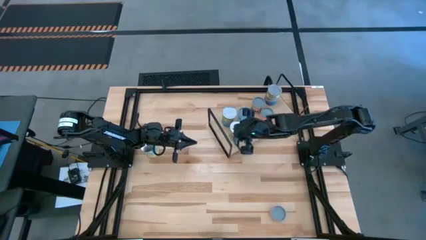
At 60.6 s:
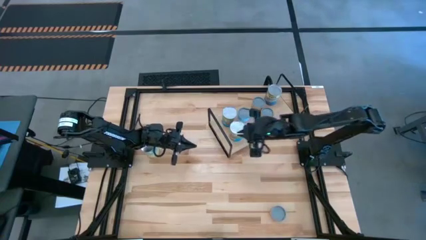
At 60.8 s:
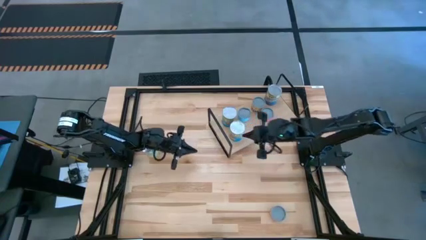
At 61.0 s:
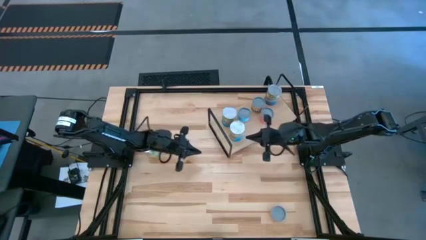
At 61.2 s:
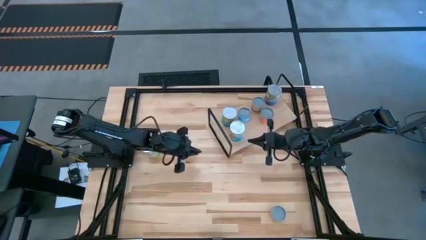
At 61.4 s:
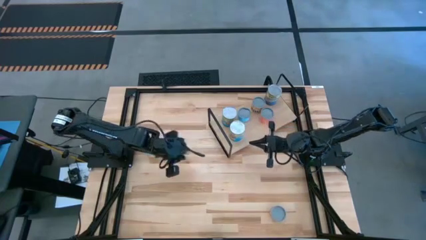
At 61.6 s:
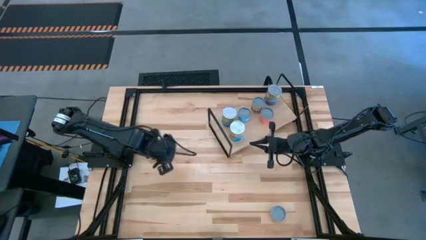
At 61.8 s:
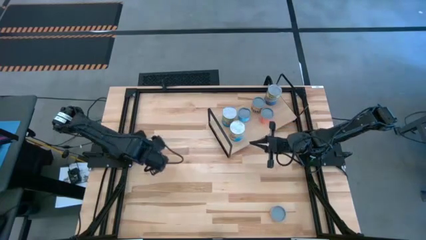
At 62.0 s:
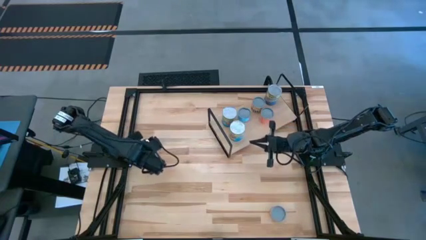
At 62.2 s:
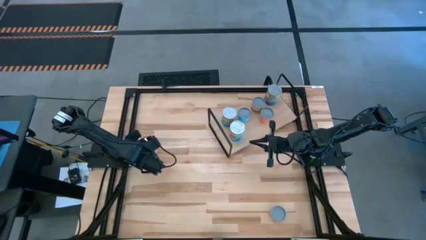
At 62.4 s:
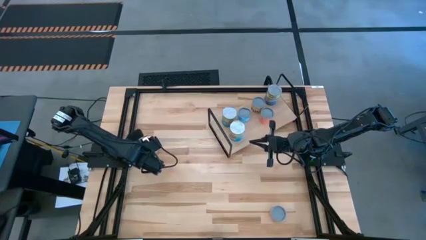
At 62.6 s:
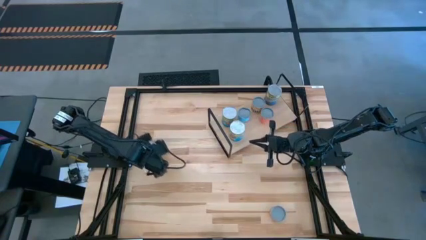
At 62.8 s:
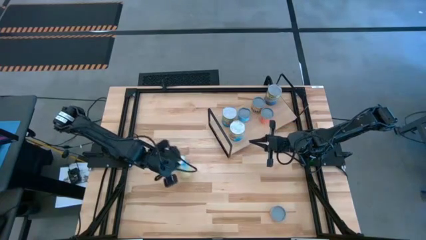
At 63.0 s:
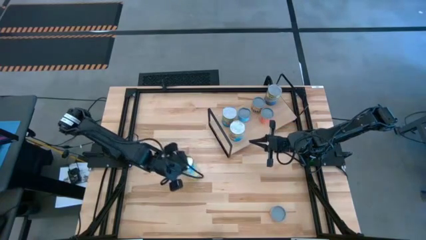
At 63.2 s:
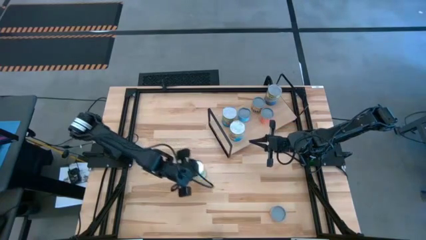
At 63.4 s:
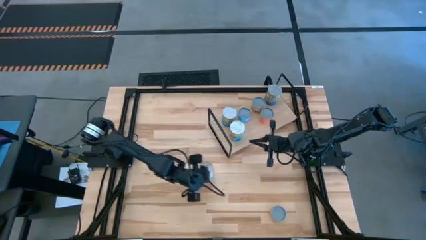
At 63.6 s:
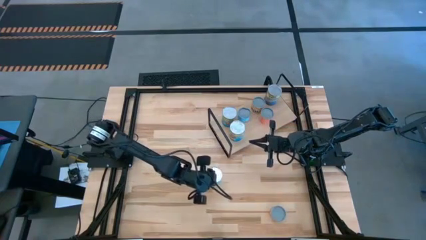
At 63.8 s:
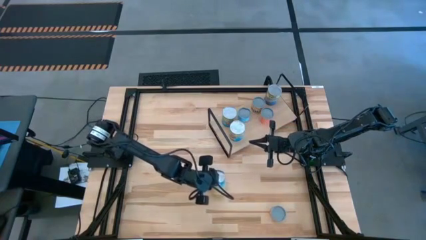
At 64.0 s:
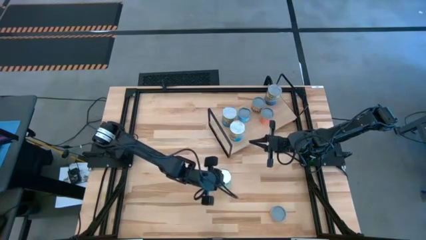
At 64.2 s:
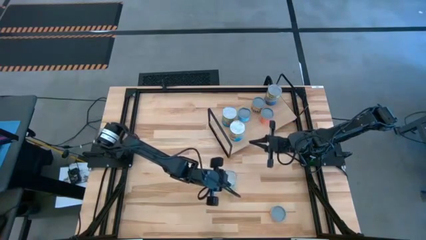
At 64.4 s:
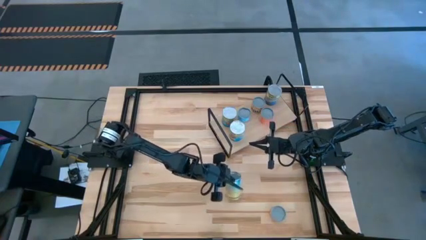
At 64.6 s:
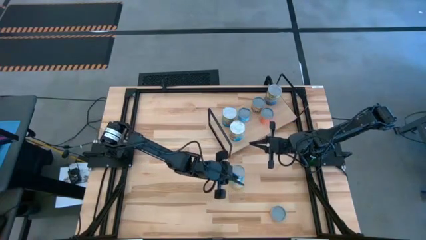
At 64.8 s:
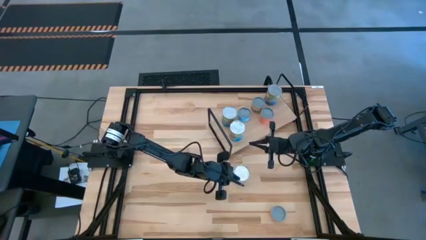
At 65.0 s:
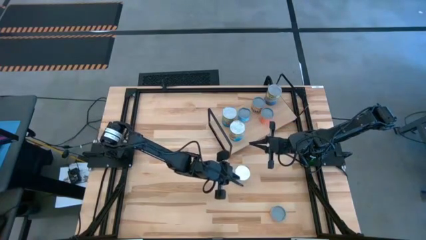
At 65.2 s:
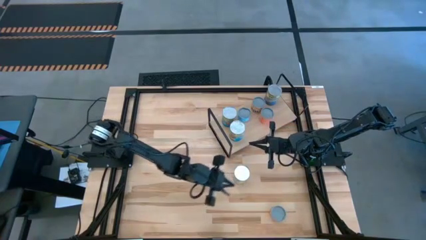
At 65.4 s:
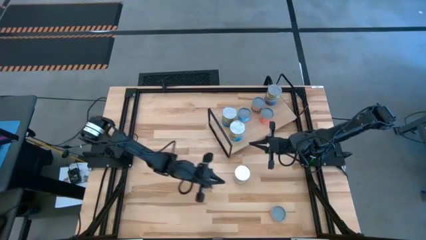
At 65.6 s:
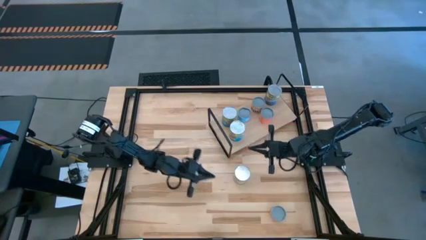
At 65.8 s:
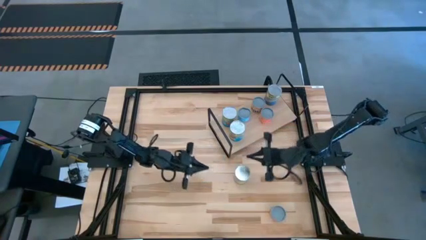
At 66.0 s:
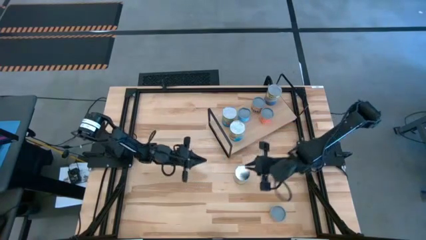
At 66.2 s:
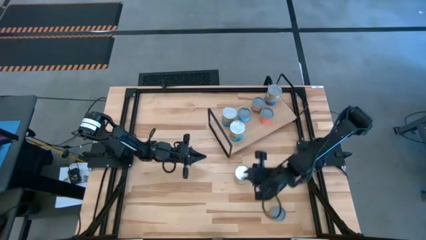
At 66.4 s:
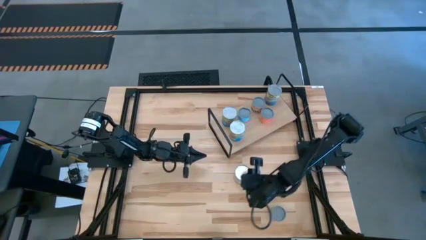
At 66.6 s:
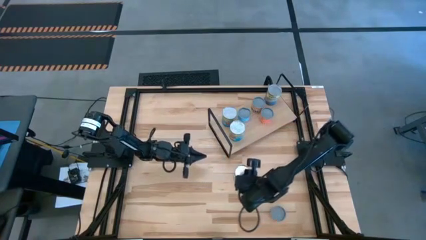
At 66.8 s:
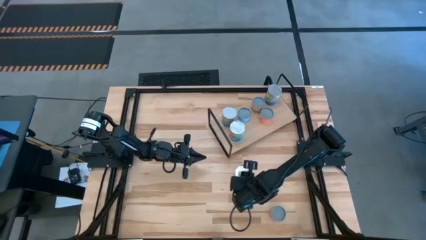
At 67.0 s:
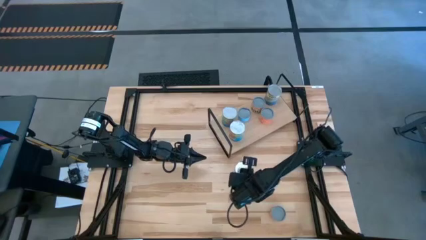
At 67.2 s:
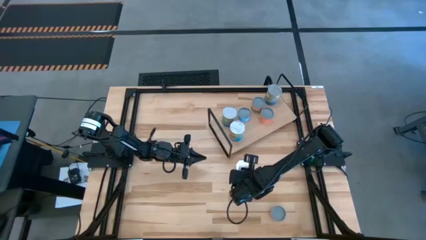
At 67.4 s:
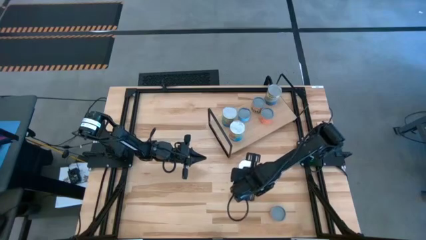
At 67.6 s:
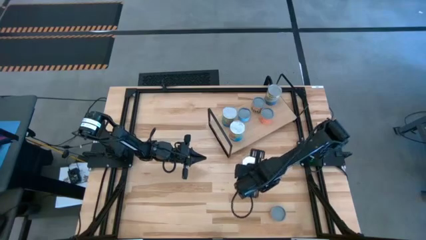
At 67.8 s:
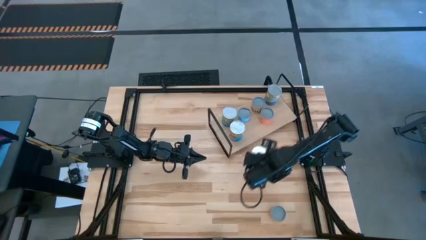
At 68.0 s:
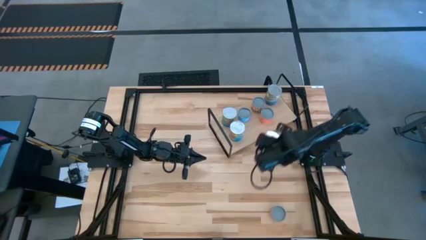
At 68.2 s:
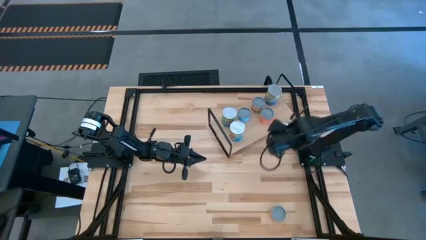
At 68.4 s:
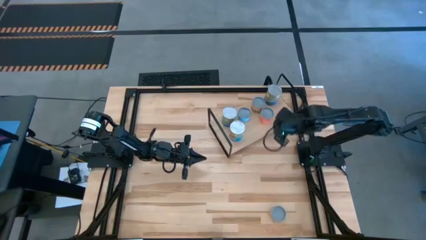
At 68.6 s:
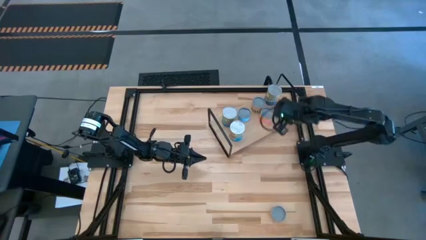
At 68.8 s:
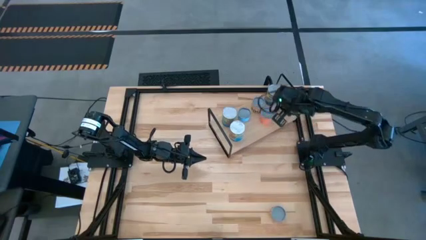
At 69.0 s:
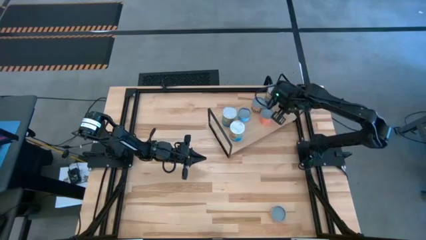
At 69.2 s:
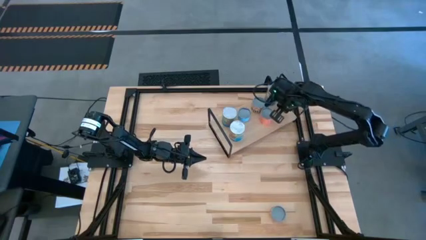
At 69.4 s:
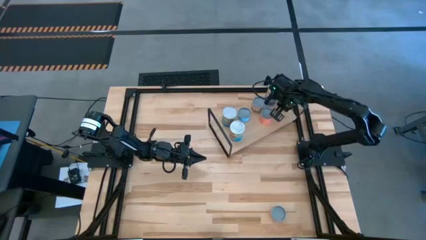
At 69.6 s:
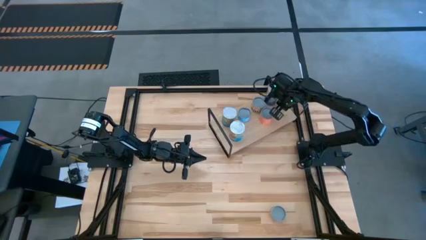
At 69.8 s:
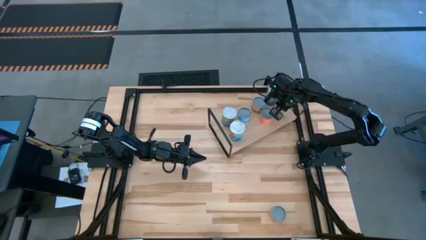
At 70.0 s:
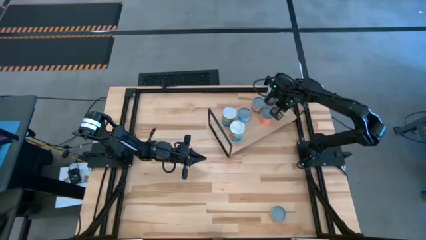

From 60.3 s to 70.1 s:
Task: Pick and place cans onto a shelf
Put the canned carrots onto the shelf aligned with other cans

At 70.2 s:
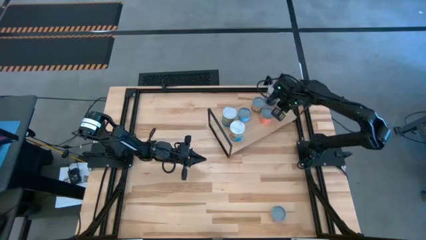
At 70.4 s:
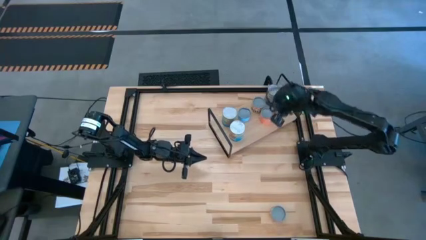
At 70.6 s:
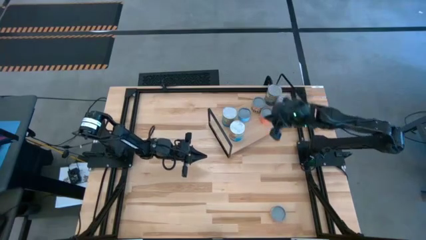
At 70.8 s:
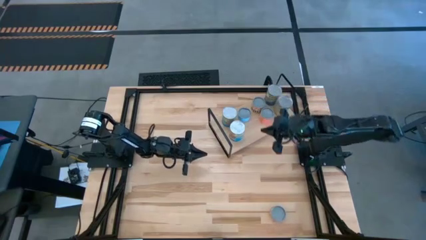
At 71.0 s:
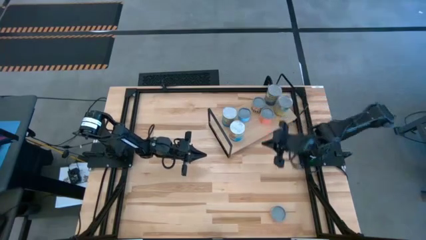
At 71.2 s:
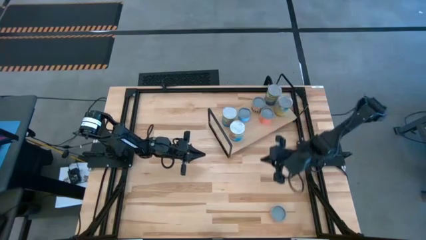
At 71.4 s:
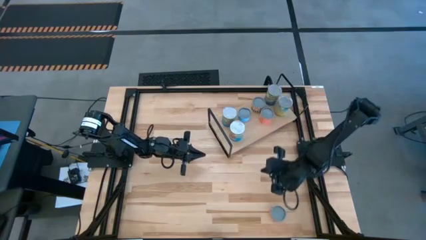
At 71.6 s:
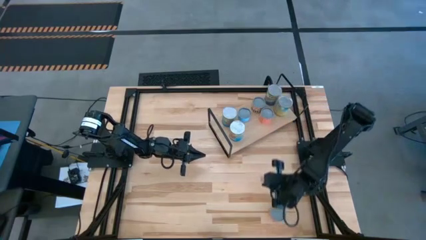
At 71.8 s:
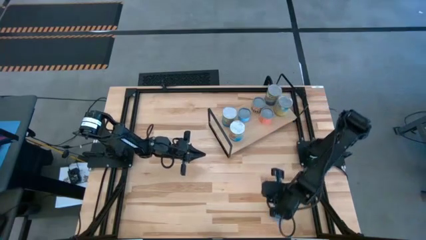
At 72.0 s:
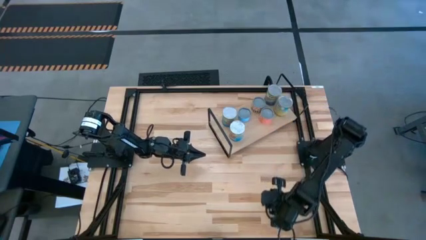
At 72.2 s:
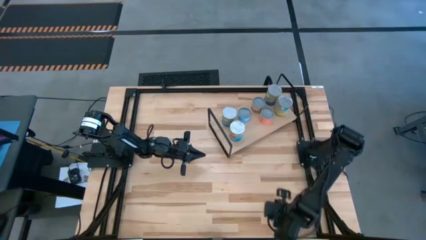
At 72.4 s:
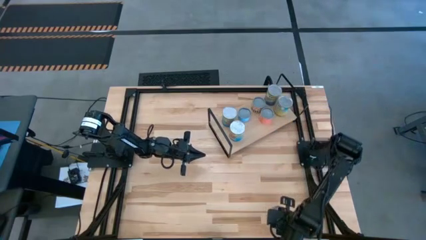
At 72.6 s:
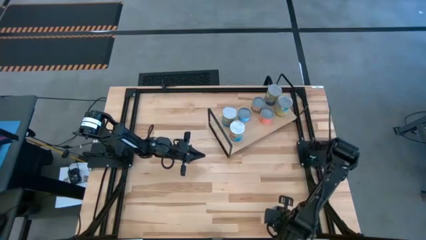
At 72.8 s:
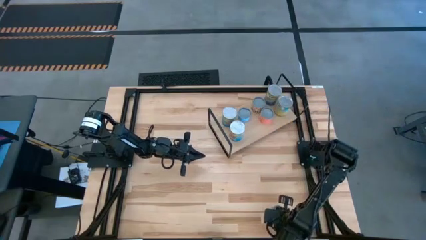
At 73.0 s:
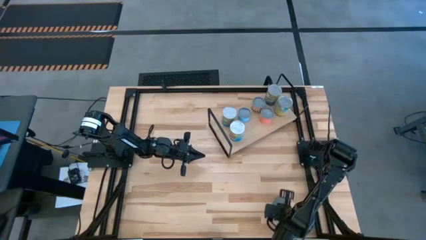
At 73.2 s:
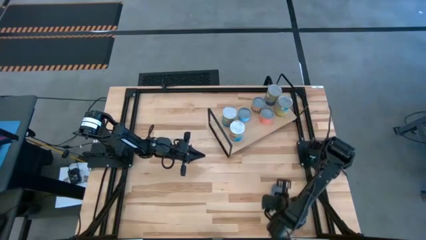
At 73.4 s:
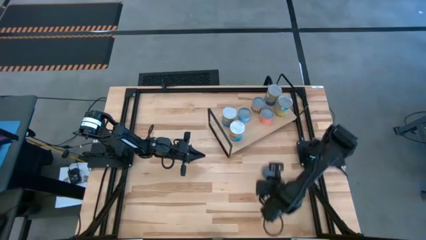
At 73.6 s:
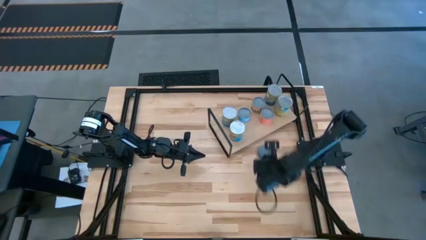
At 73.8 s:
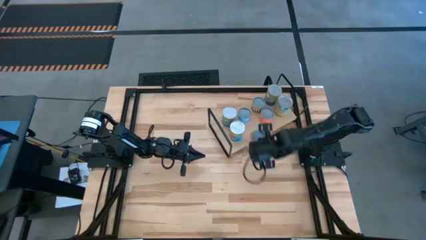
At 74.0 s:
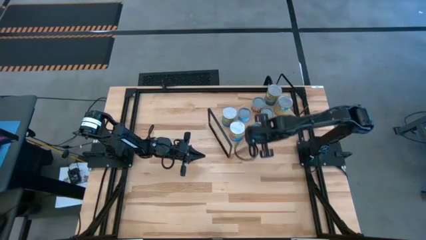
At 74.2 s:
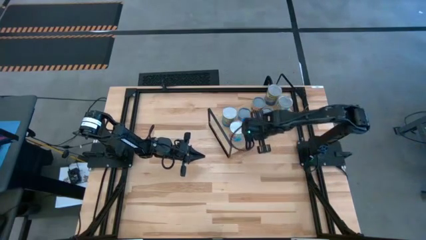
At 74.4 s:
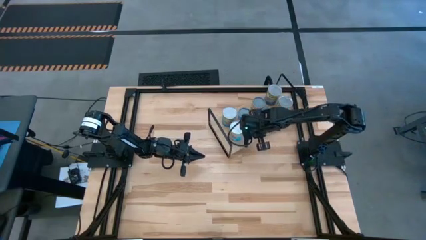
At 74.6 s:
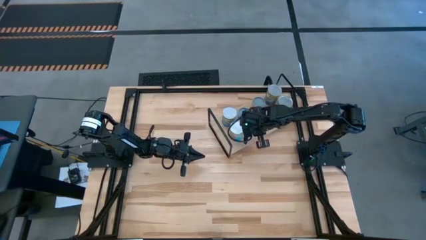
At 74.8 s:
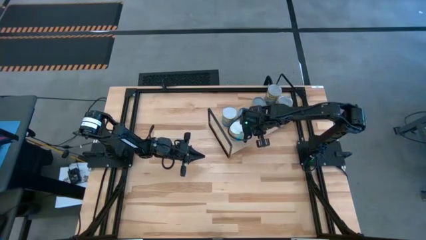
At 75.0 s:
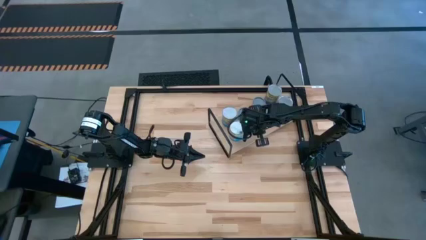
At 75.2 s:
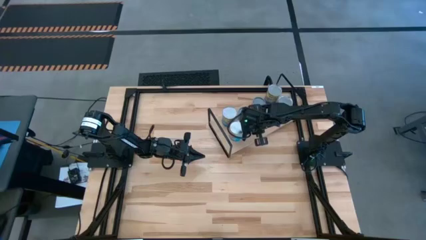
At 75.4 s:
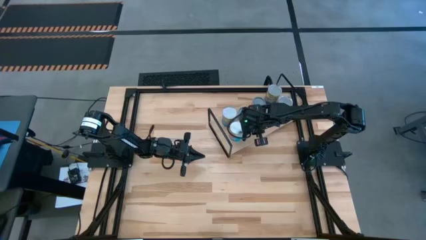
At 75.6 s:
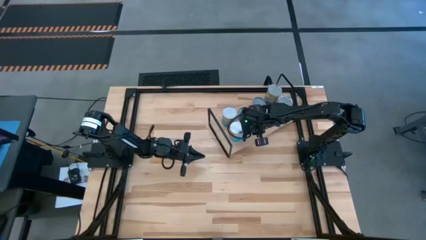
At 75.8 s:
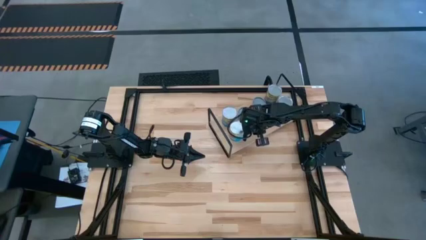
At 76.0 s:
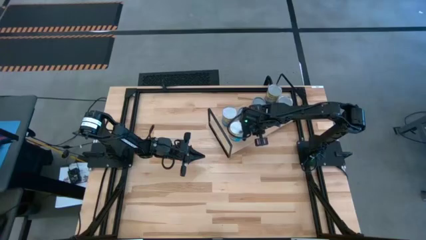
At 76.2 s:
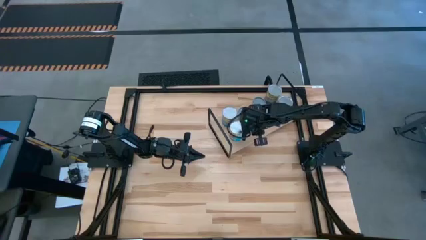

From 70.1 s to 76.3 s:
Put the canned pineapple rings onto the shelf aligned with other cans
